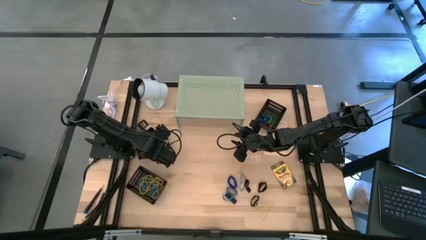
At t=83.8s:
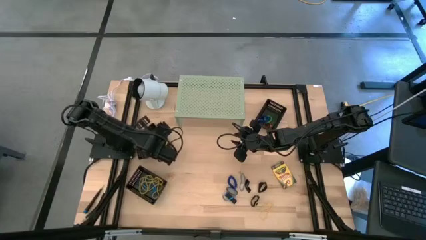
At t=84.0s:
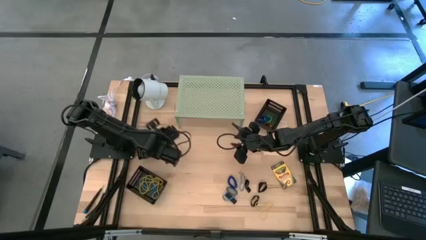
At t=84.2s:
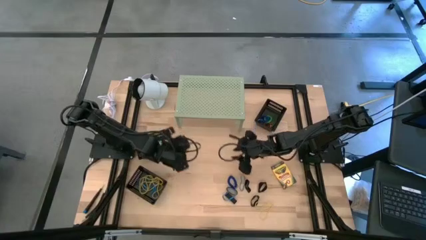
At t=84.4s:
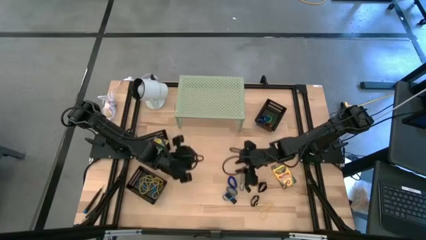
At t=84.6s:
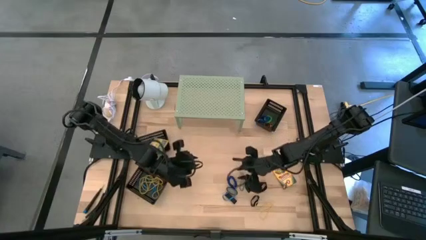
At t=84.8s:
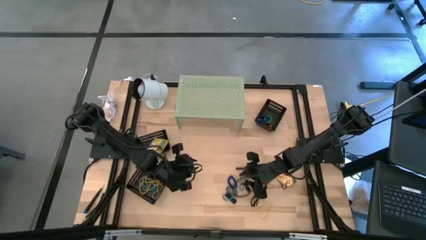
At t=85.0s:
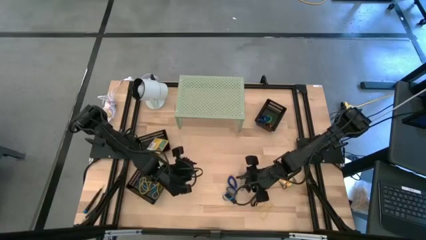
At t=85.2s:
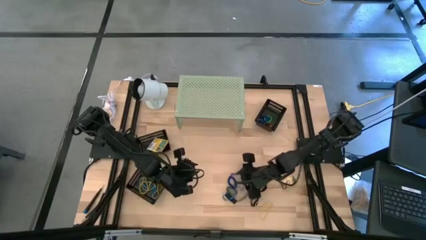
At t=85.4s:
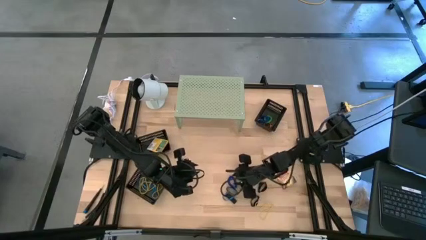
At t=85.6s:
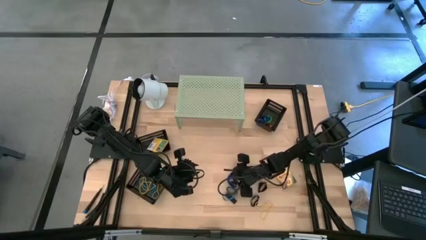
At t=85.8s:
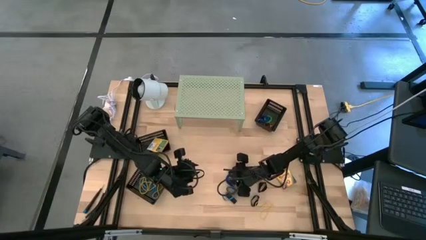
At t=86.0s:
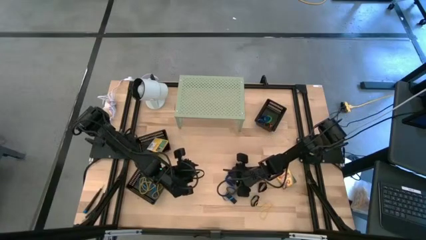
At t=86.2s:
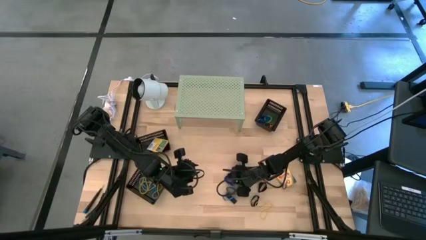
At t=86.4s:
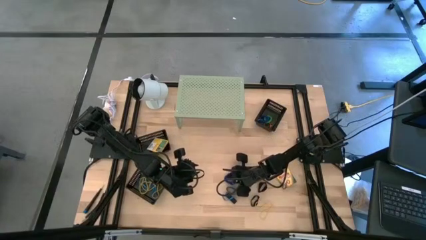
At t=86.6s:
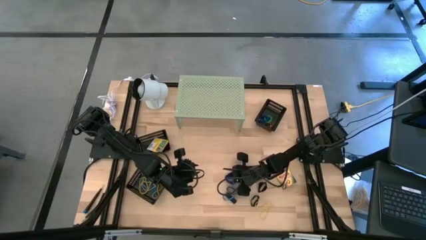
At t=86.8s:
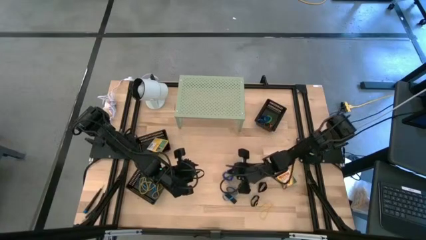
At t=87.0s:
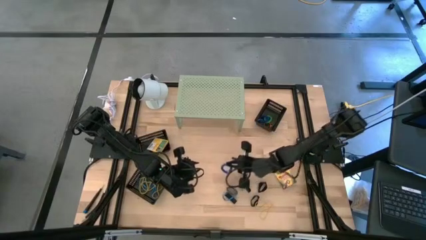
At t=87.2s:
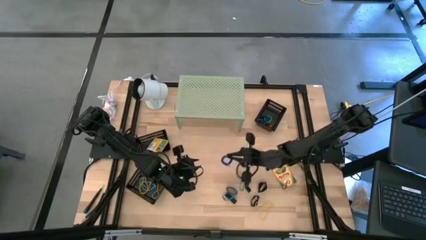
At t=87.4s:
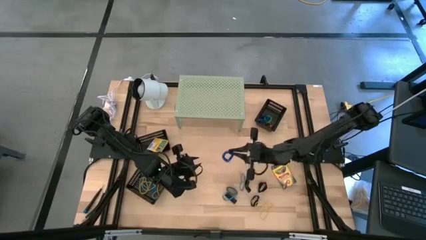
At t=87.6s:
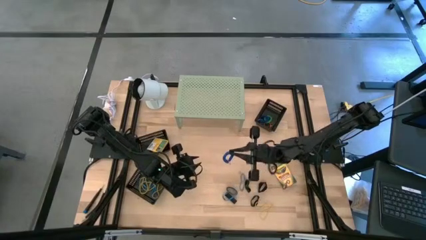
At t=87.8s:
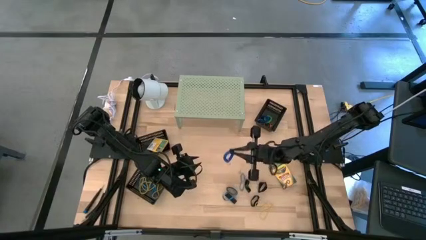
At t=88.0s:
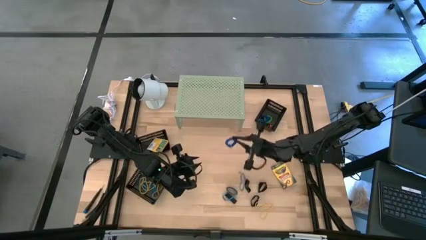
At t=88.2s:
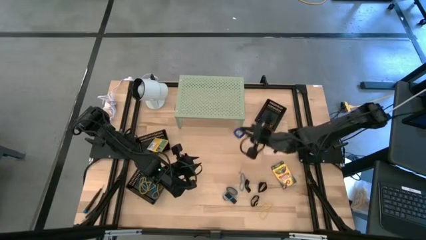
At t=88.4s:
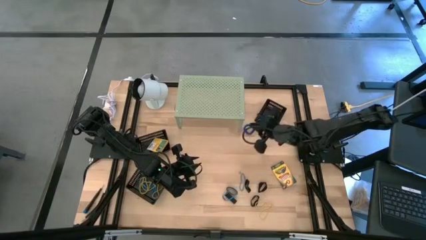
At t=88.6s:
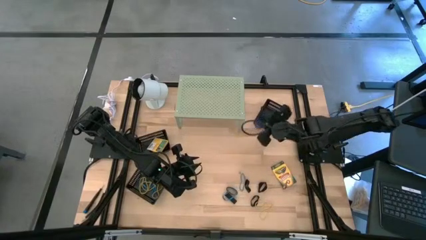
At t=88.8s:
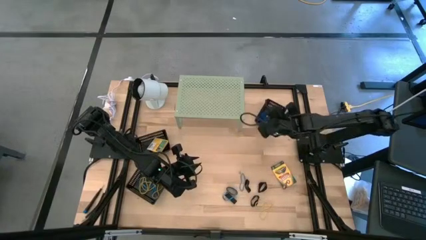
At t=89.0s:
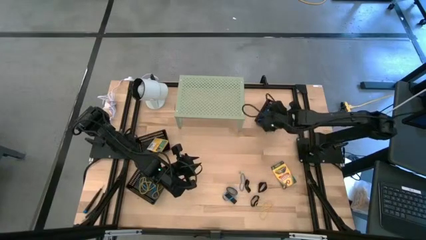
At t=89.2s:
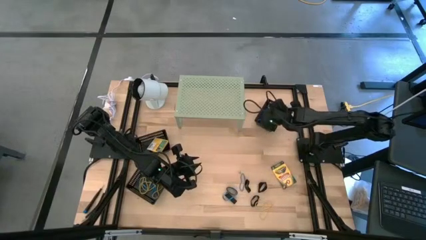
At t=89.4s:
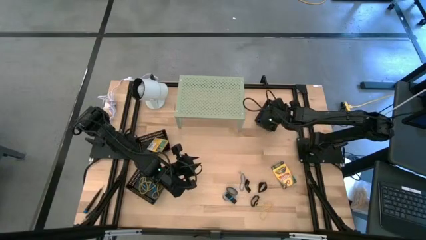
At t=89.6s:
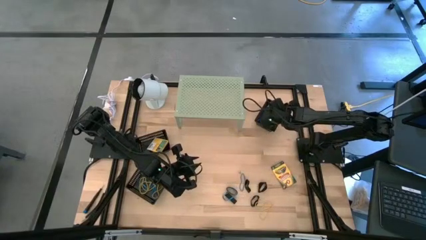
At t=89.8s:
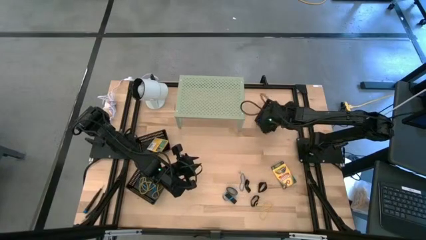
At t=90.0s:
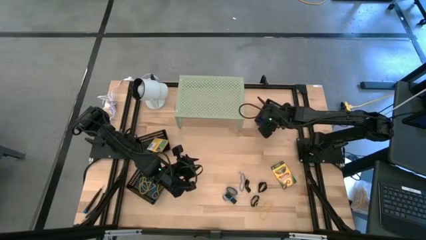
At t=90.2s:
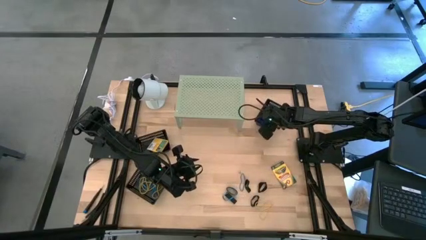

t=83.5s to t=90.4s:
Task: Pick & Place Office Desk Supplies
Put the blue spring keychain into the top right black bin

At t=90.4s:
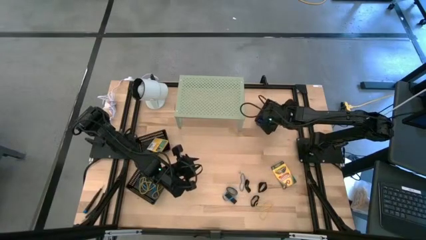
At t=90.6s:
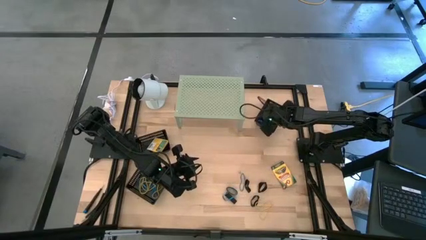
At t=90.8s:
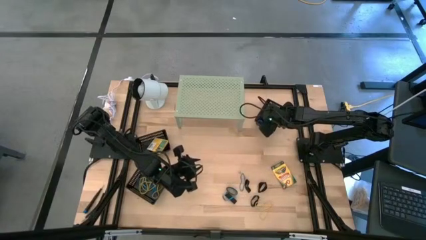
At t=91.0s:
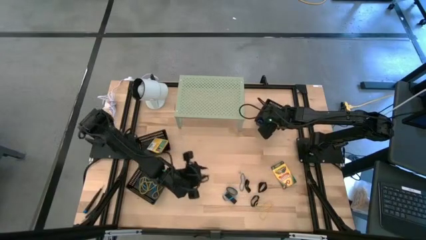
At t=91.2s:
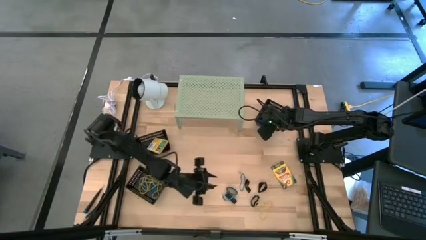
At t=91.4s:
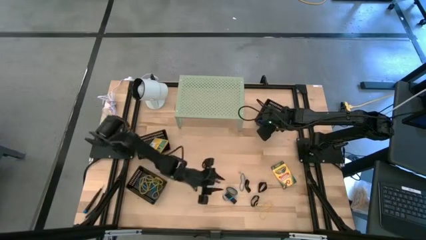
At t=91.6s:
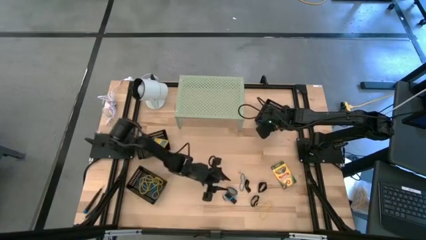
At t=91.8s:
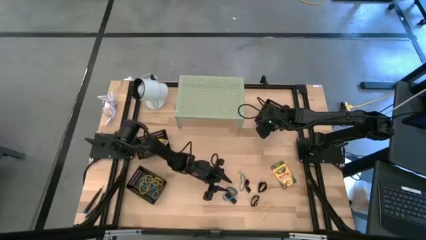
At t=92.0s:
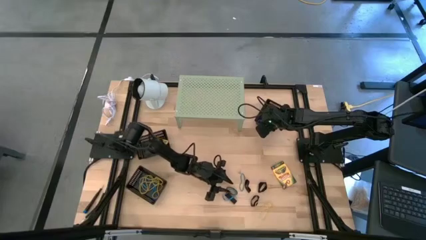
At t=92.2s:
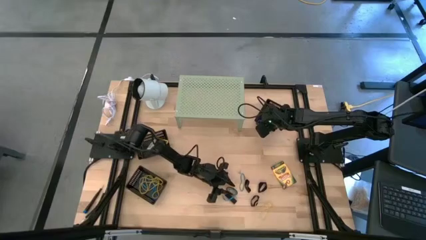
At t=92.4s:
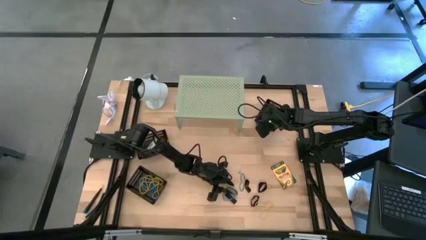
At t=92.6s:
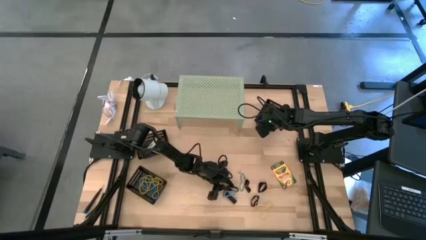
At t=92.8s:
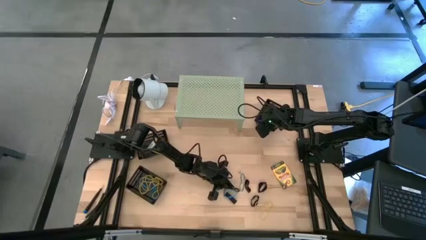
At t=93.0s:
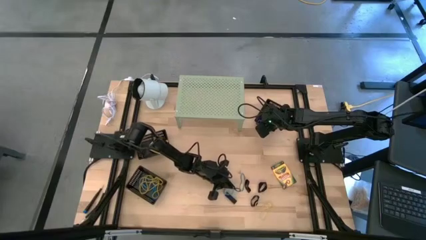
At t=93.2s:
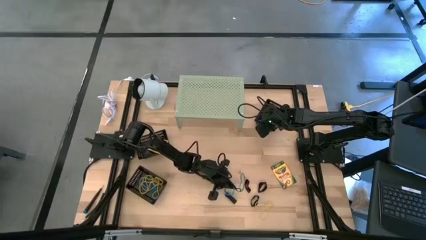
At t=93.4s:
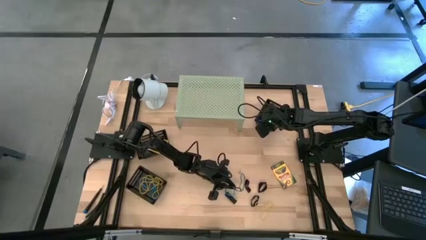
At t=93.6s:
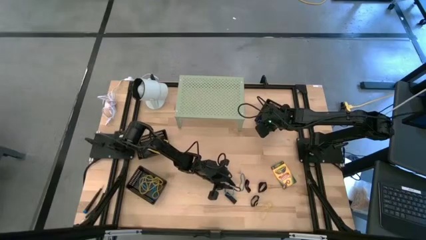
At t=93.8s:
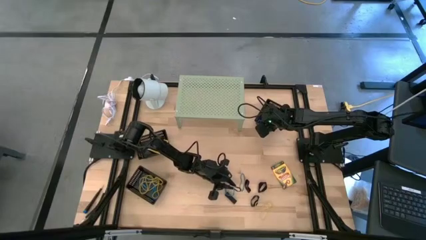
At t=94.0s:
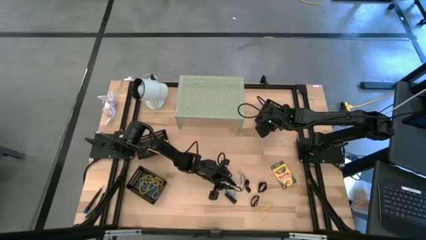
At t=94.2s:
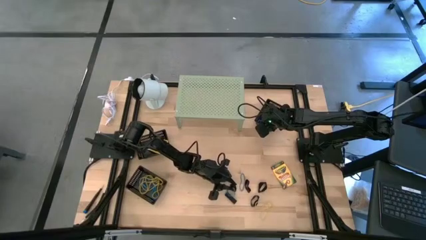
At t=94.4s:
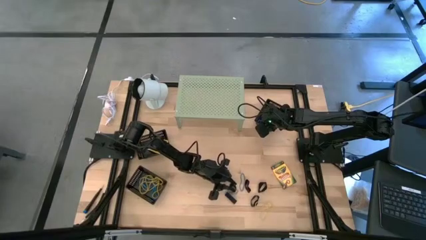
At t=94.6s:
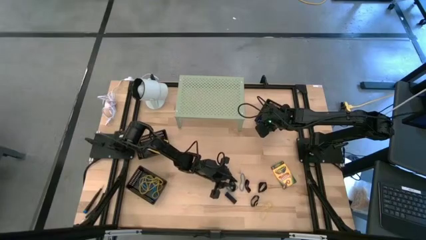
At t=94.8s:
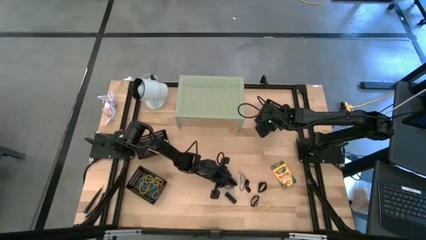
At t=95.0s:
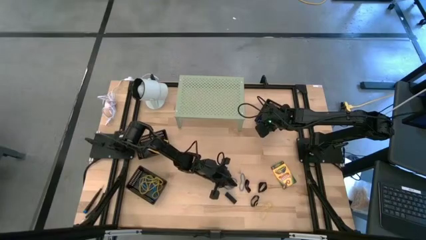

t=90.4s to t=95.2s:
Put the blue spring keychain into the top right black bin

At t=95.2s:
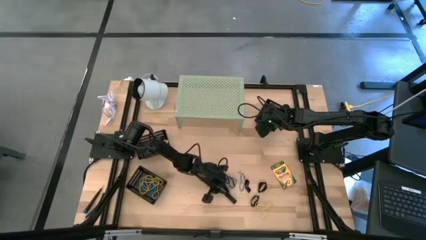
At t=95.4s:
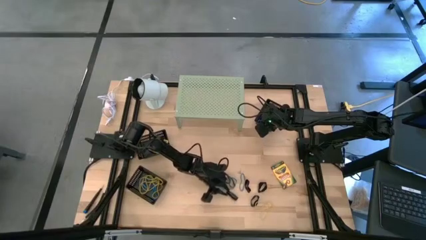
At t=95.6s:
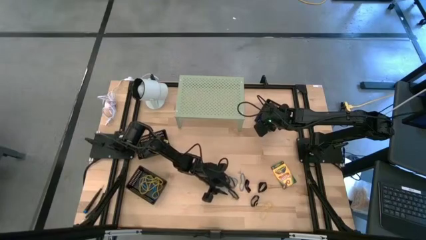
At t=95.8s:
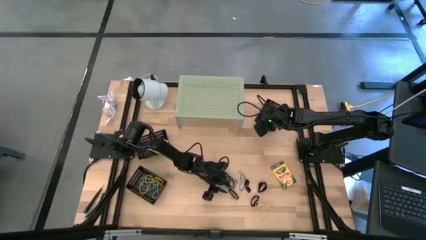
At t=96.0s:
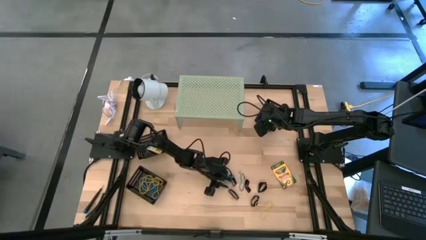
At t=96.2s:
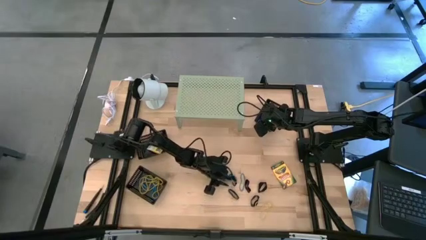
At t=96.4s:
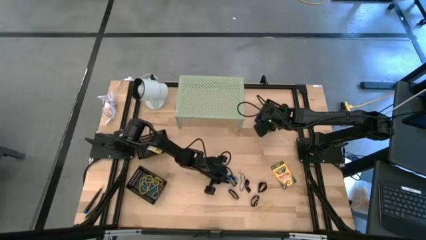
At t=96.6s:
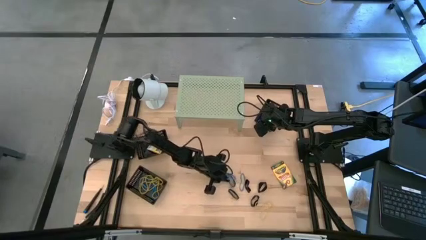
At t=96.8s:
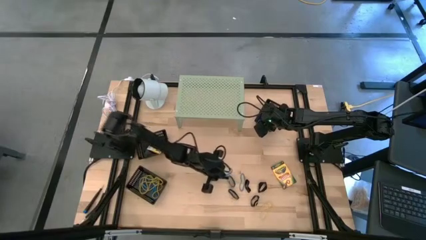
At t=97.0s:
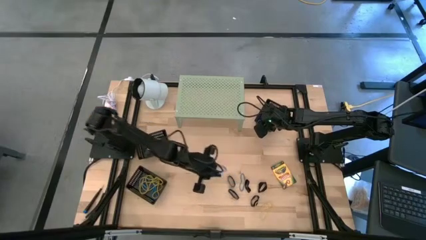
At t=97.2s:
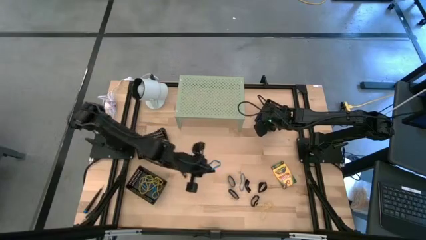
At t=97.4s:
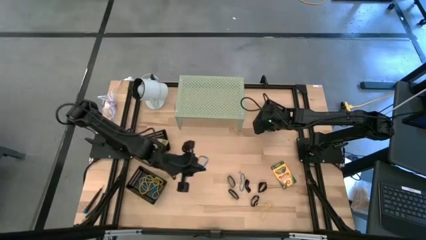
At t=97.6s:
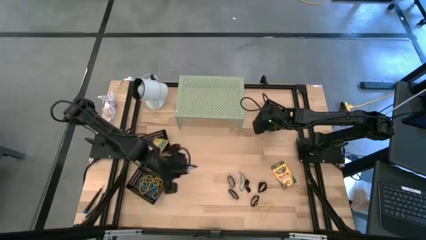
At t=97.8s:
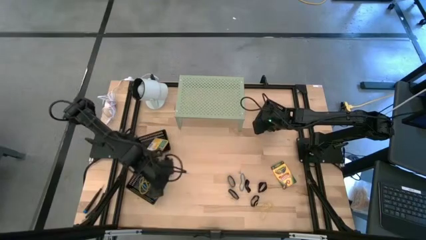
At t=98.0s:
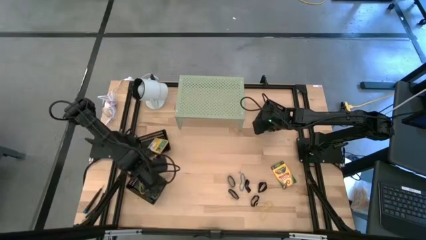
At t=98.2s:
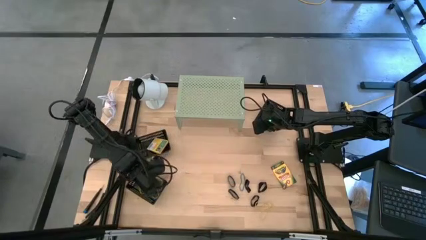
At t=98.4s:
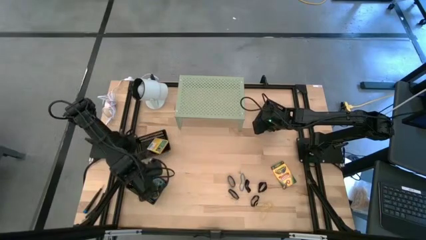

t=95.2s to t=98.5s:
Put the blue rubber band into the bottom left black bin
